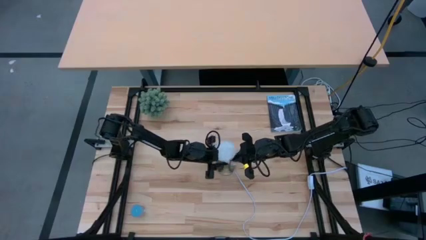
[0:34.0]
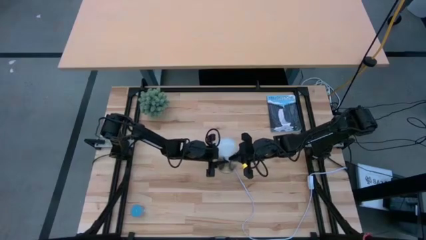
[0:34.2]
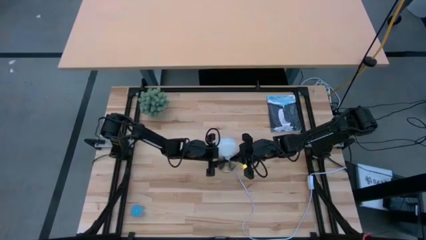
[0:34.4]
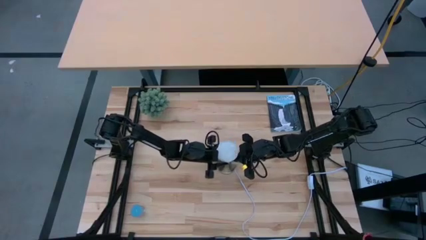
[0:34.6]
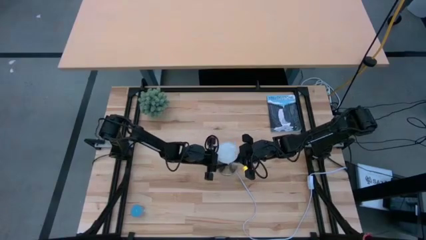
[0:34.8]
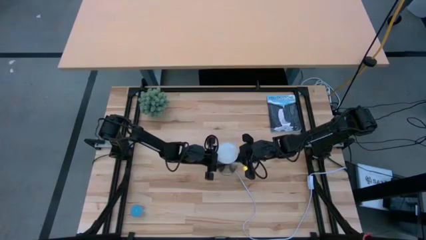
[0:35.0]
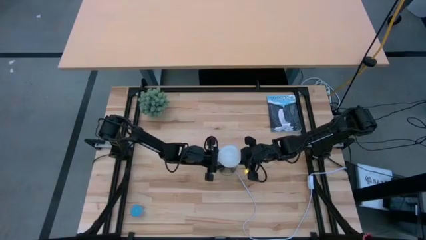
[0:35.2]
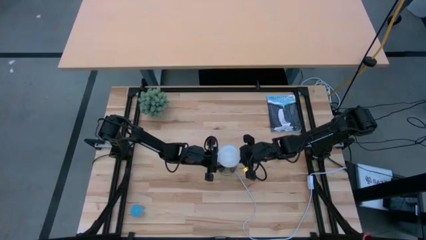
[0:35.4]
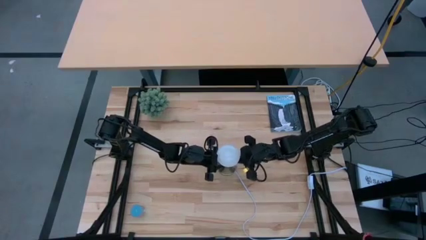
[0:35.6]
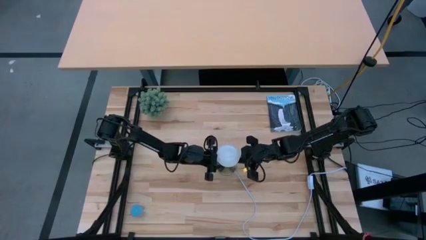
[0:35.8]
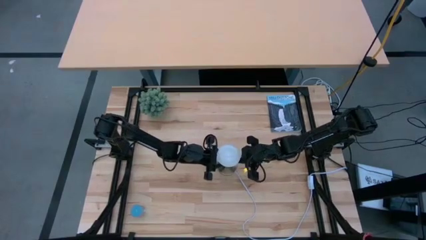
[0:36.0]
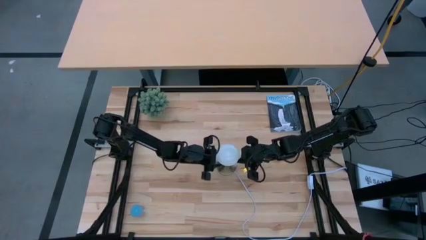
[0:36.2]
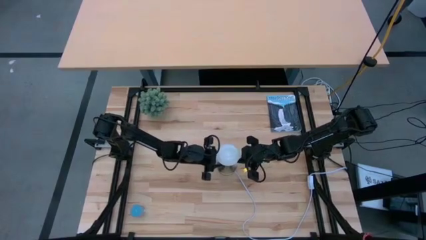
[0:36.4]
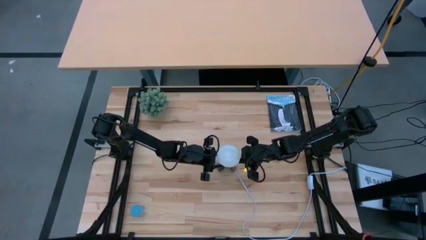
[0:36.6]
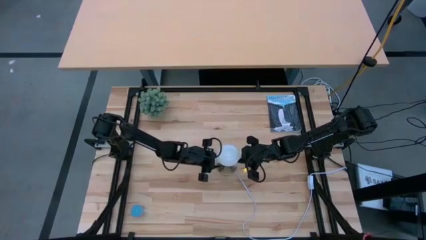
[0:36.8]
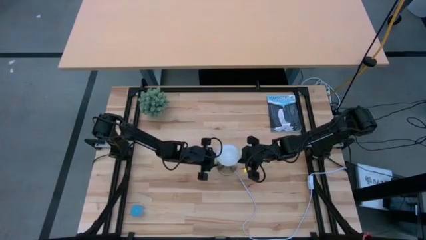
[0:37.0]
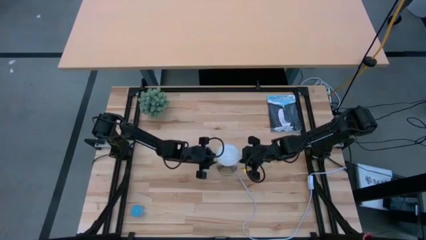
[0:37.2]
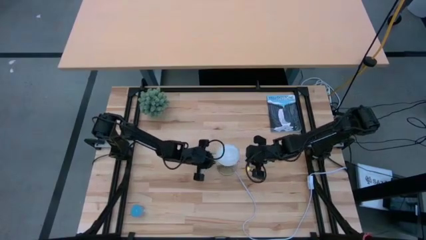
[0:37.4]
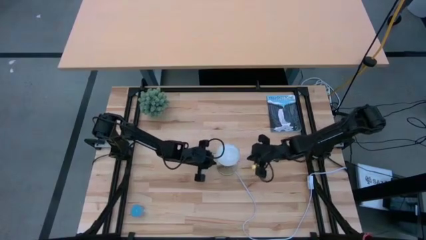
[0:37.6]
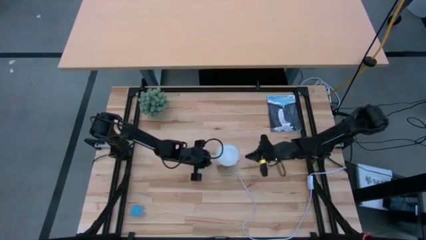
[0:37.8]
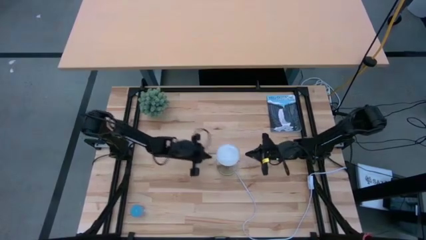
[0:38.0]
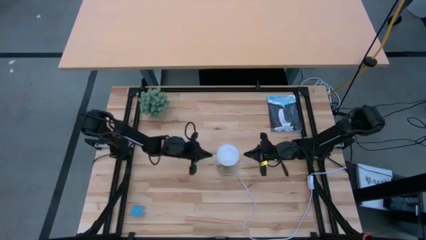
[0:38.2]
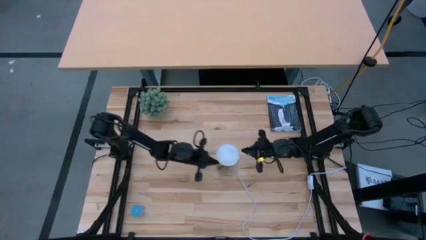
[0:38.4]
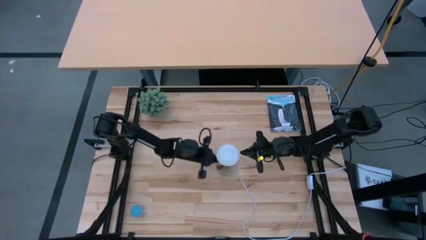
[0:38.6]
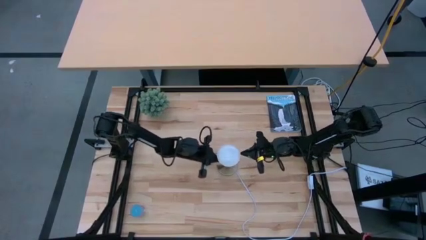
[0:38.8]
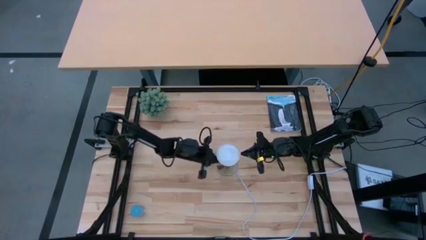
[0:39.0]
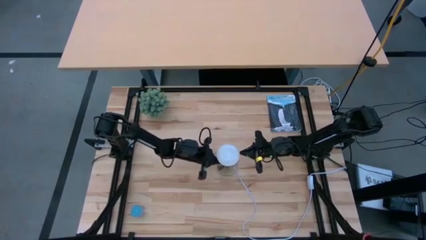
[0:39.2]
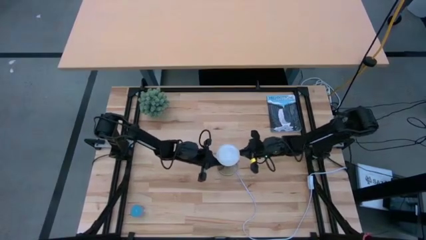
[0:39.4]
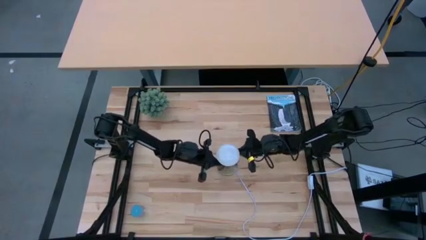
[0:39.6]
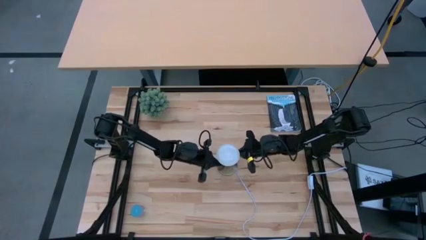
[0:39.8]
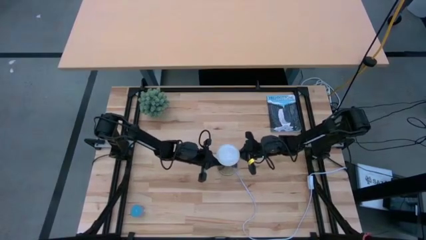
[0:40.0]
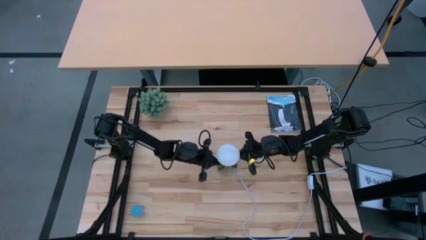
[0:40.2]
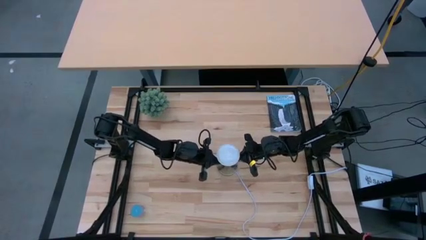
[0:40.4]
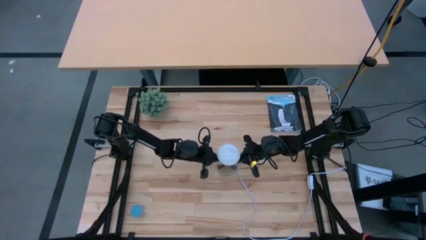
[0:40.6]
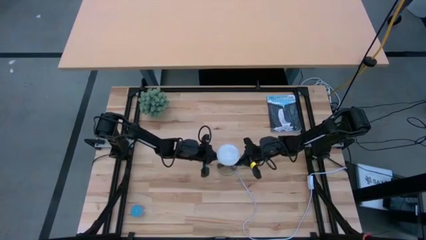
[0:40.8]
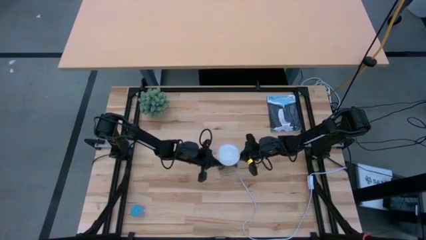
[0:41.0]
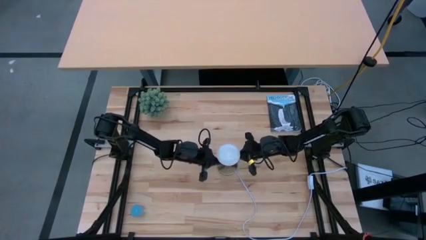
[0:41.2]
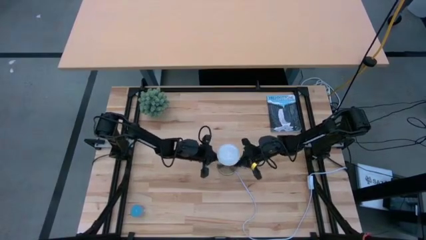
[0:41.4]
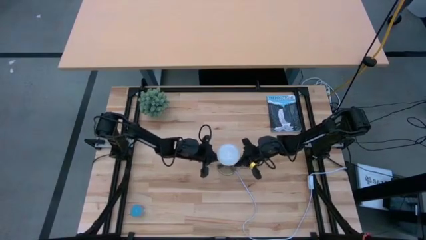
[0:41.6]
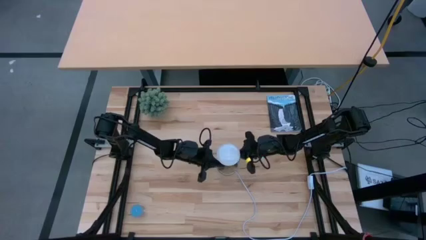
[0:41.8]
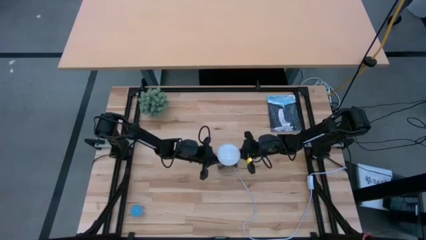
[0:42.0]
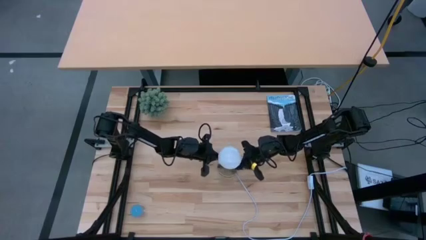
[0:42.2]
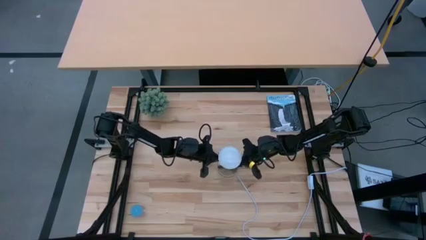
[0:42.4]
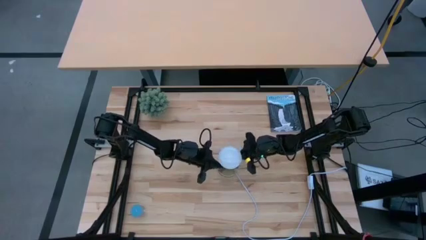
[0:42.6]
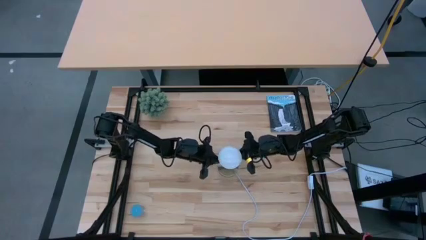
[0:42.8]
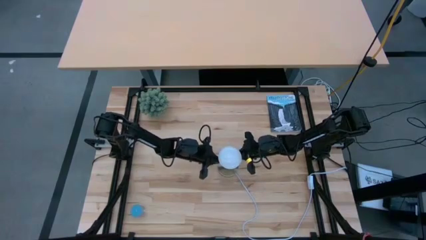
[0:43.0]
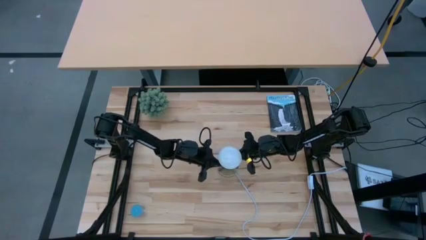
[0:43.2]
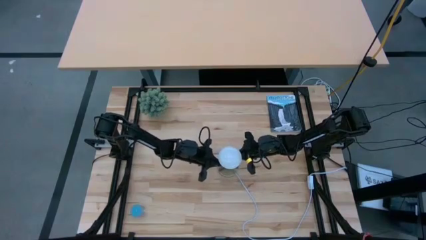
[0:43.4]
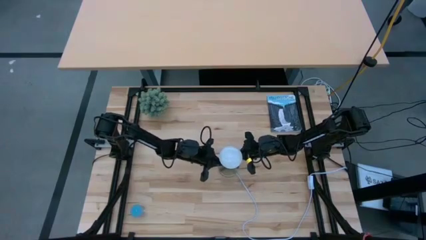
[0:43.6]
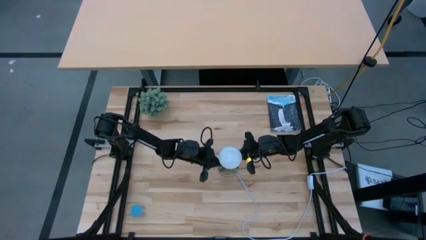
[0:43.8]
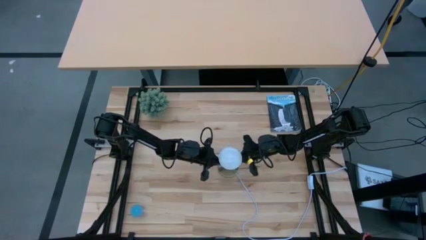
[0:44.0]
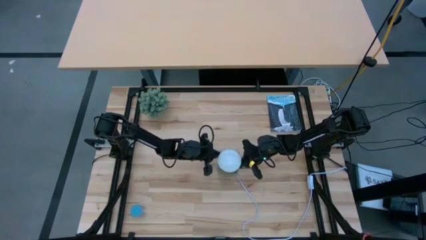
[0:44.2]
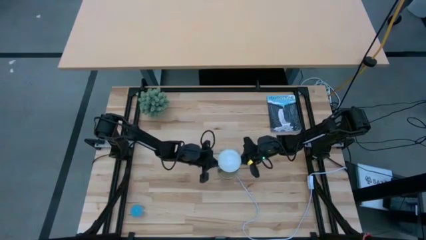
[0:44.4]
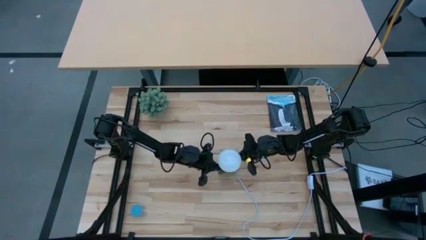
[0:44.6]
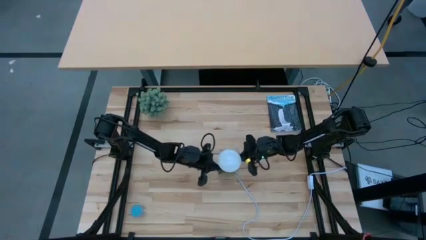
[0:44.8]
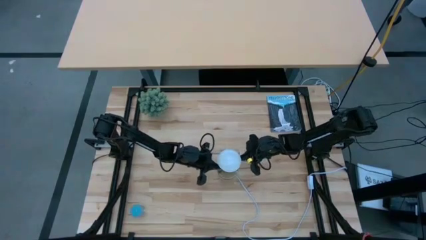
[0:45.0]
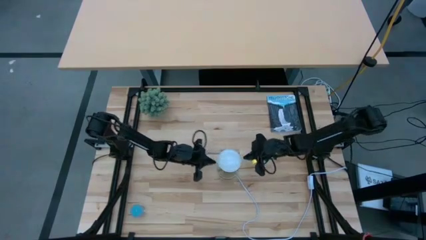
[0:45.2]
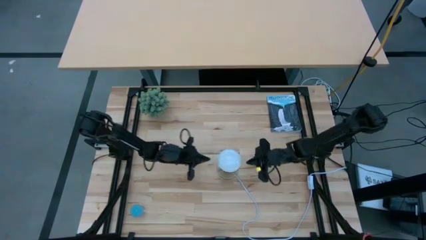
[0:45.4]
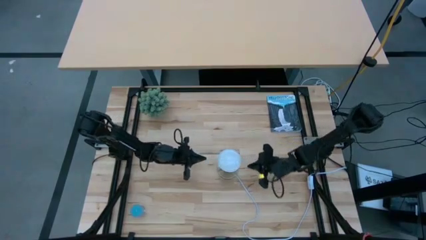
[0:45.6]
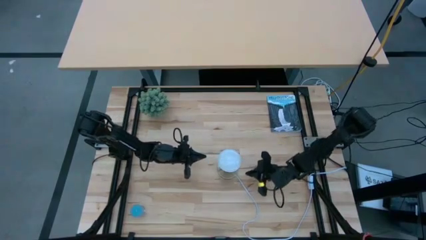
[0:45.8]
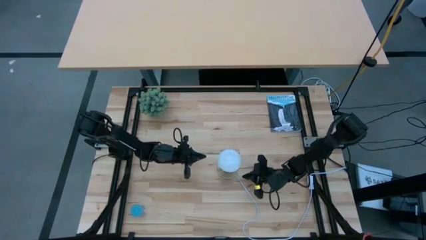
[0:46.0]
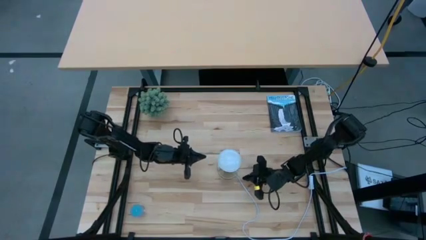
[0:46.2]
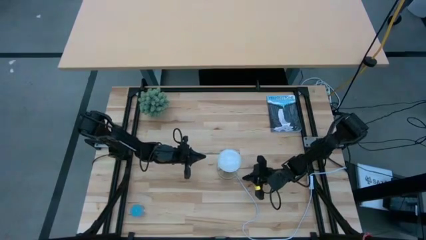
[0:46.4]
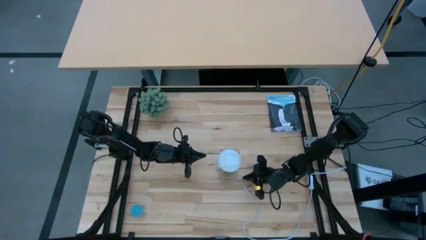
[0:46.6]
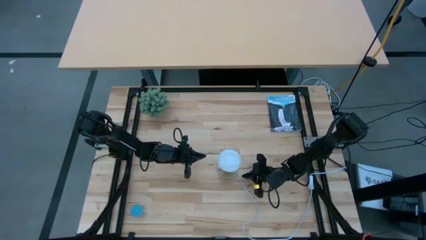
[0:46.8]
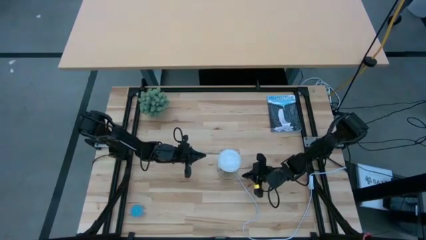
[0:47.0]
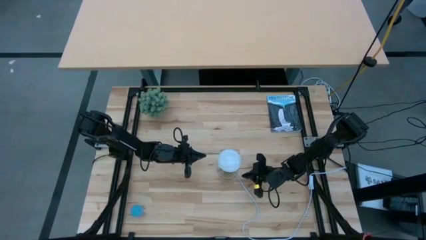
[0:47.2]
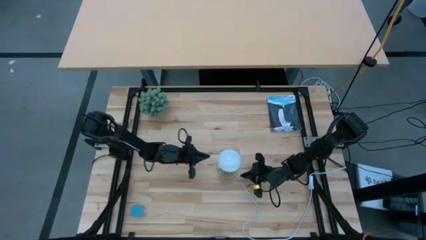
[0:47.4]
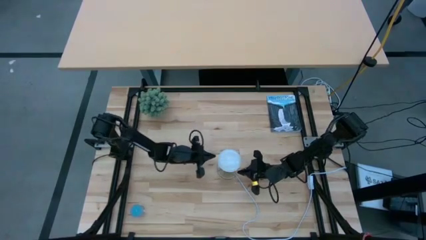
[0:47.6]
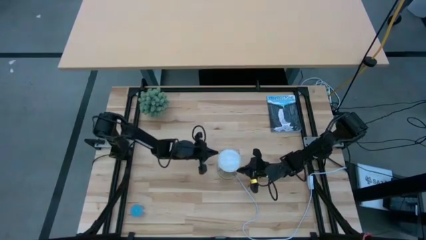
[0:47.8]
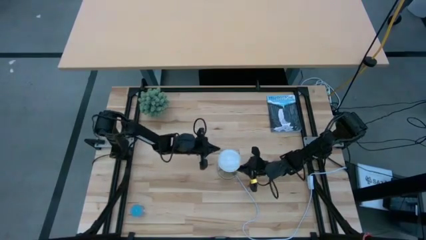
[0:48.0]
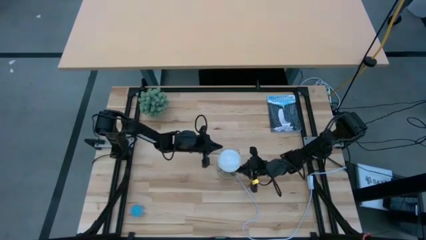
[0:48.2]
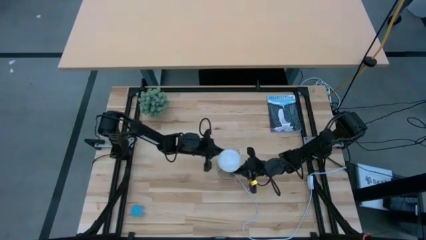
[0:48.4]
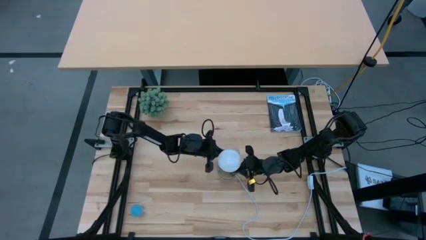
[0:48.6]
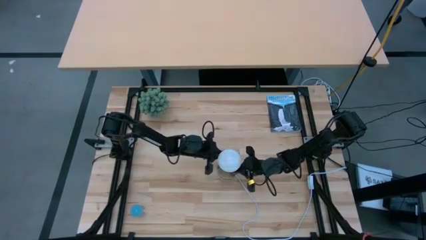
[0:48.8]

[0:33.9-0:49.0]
Task: Screw lightbulb
Insert the lightbulb into the lamp

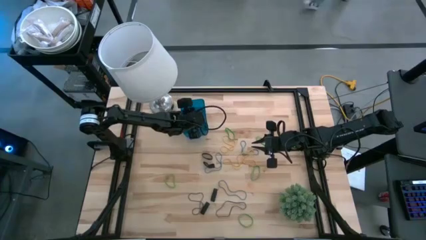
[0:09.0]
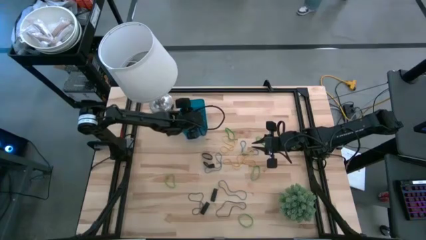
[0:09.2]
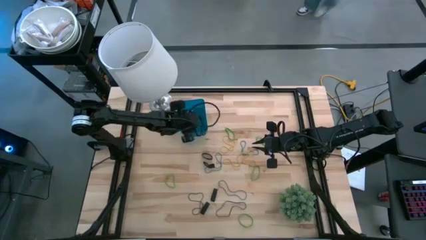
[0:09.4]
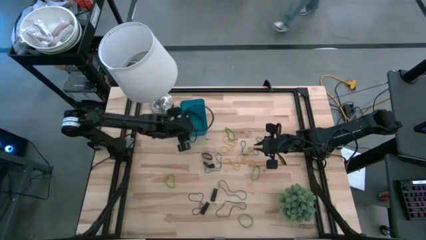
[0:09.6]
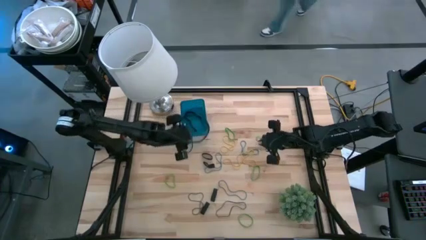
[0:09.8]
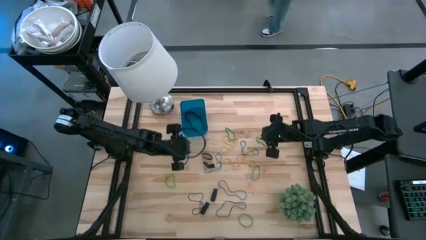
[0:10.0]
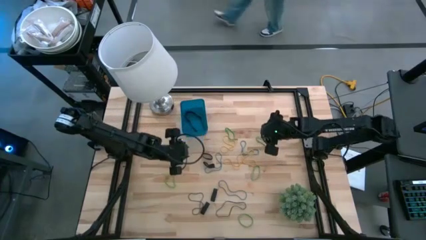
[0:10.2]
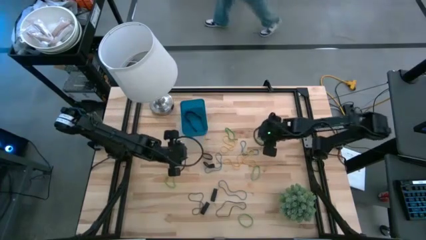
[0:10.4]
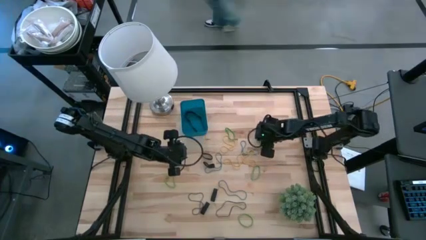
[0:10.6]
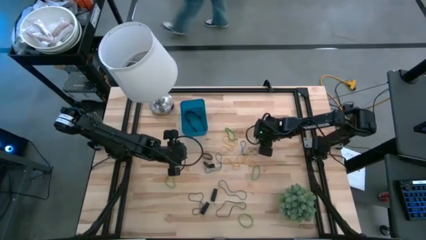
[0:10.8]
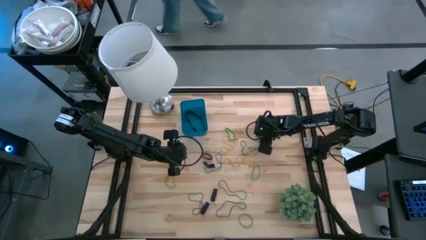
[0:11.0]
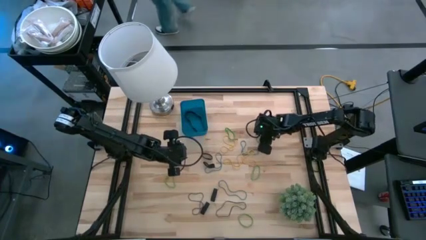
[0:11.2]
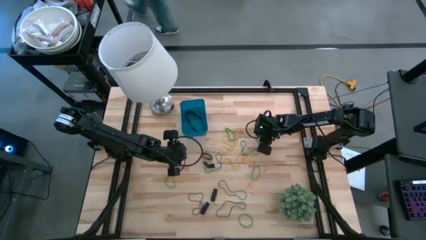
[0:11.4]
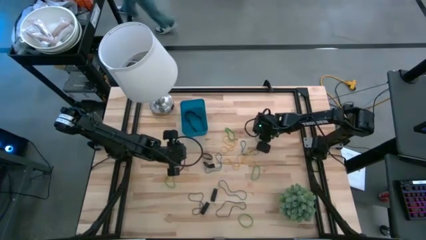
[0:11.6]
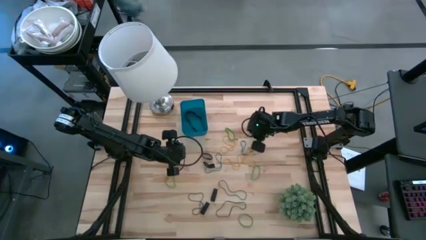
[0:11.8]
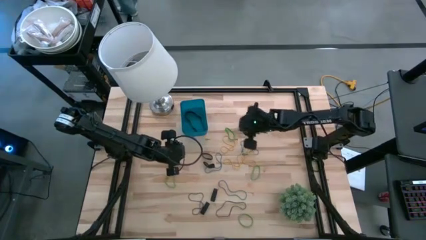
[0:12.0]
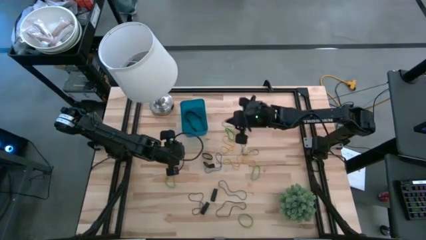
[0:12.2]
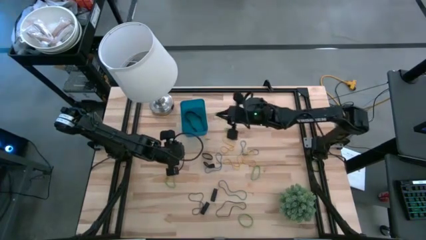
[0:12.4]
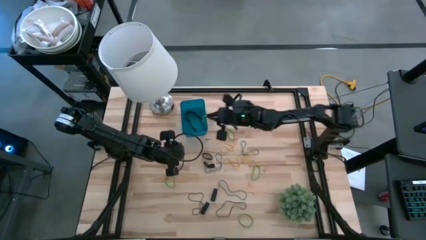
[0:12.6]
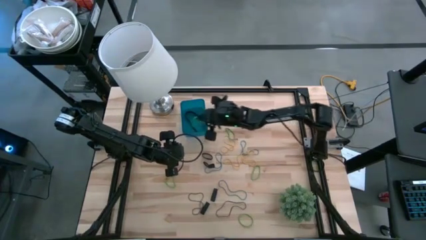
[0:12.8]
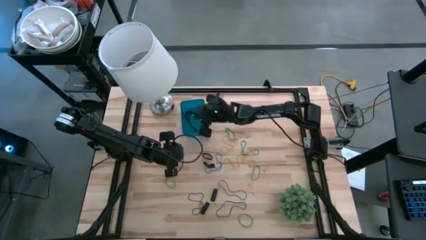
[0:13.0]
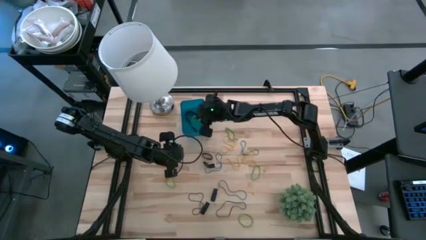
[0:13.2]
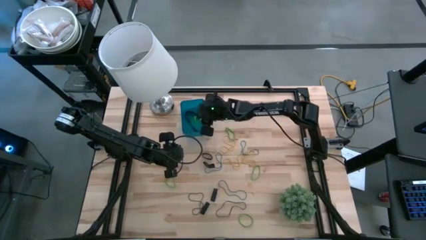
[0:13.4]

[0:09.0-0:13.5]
Task: Pick and place rubber bands into bin
Put the green rubber band into the blue bin
